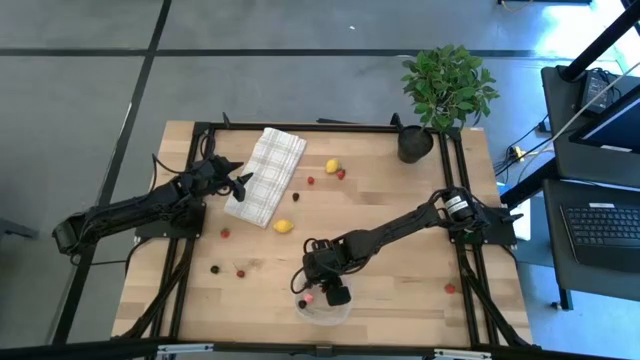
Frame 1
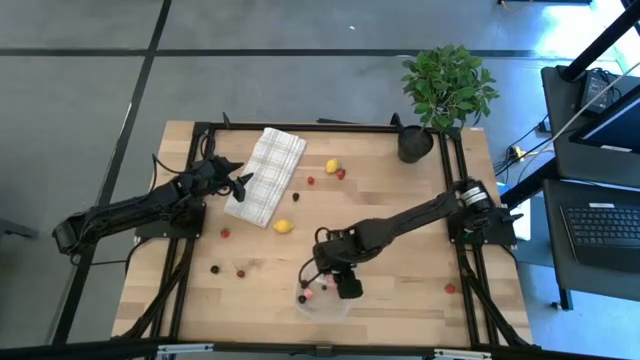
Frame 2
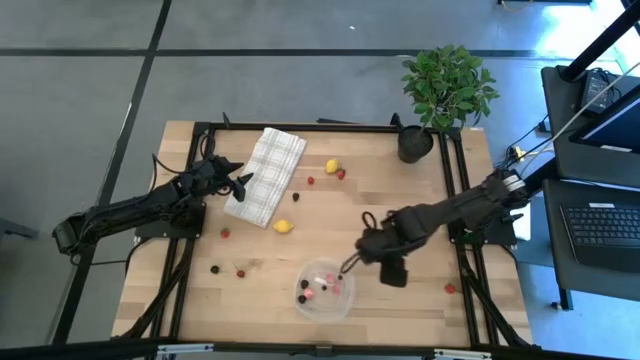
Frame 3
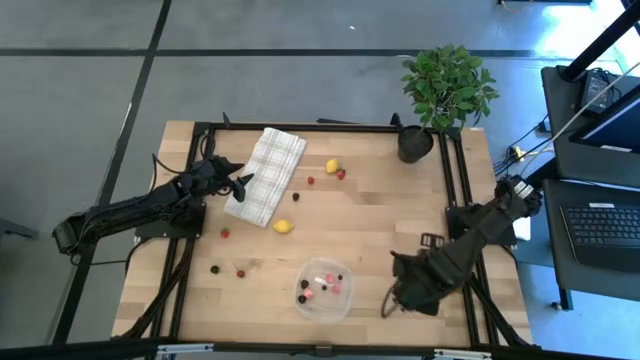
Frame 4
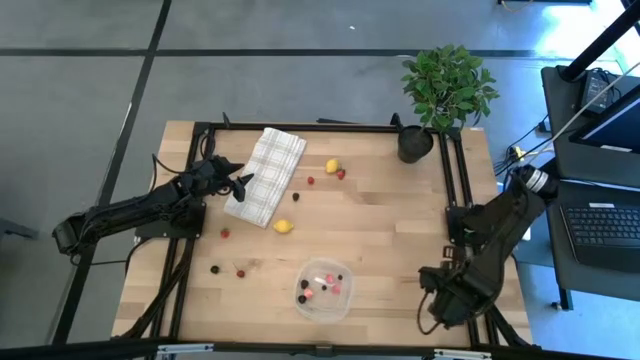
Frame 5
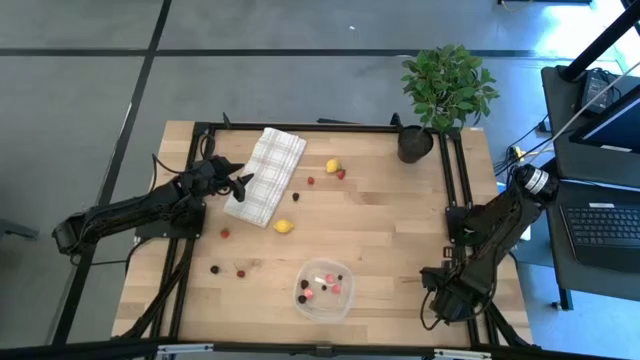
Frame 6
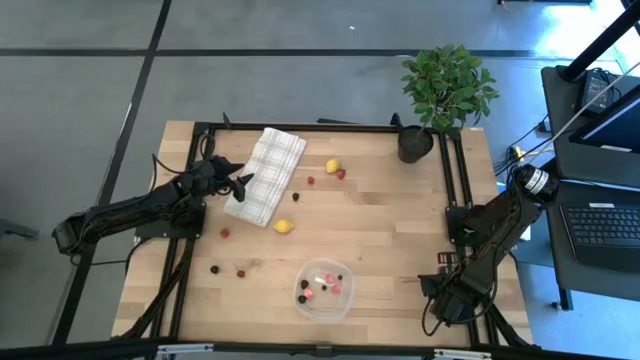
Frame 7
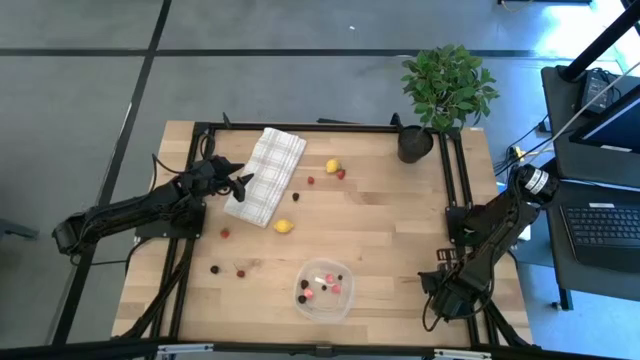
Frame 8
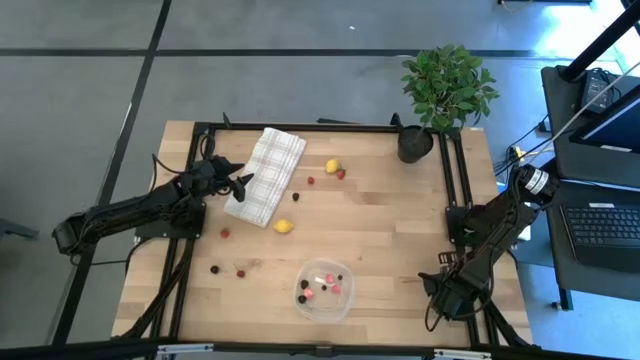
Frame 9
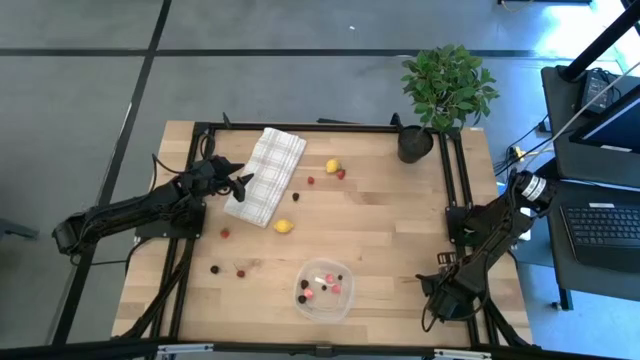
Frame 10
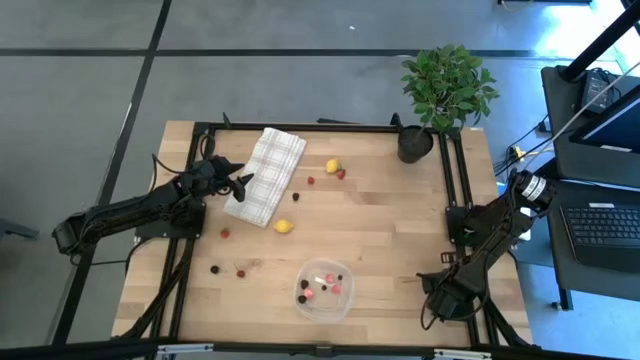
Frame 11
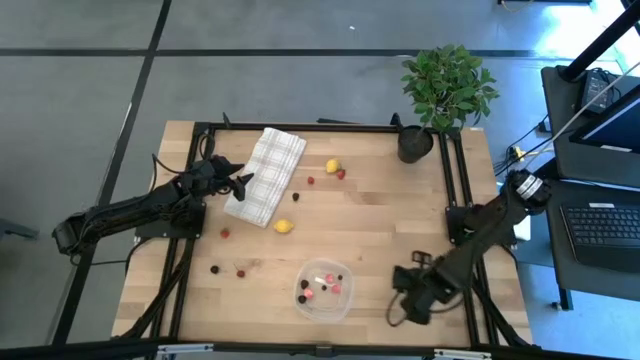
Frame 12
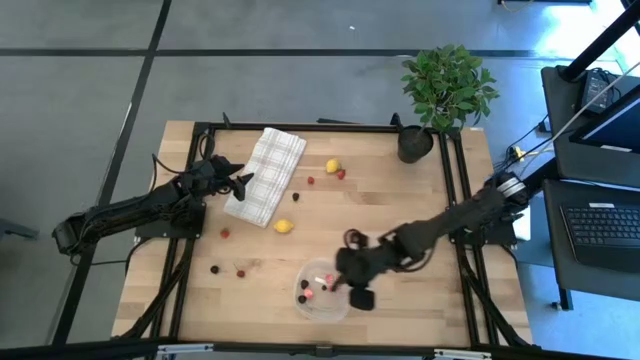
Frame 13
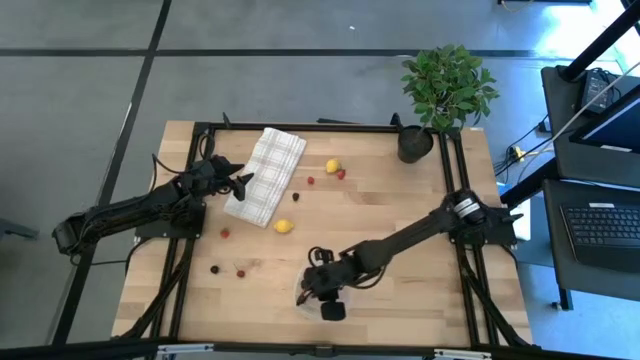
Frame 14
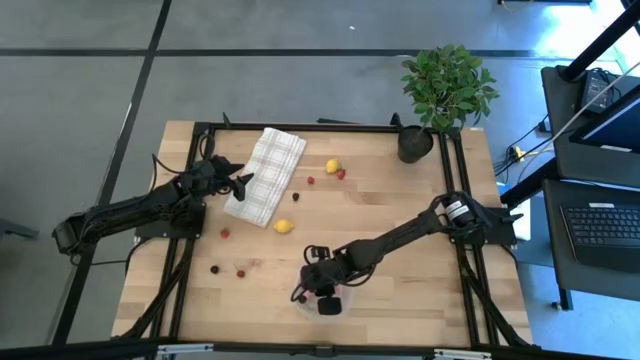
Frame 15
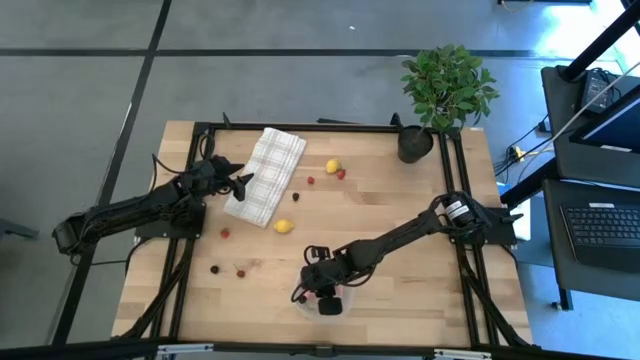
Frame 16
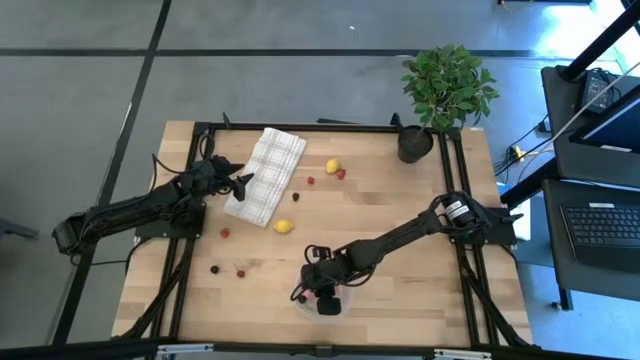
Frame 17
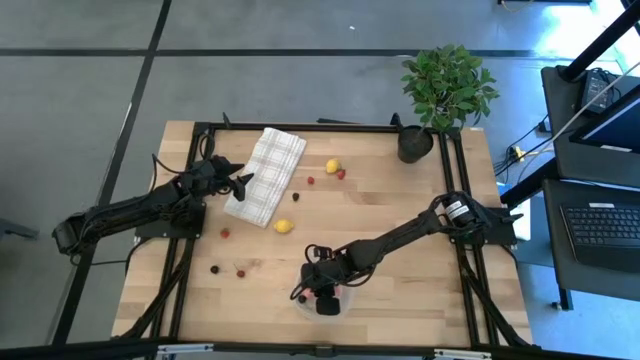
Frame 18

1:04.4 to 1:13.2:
Task: Pick and placing Produce into tupperware
Put the right strawberry into the transparent bin

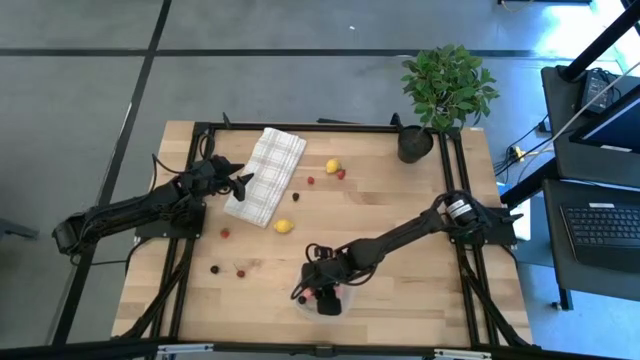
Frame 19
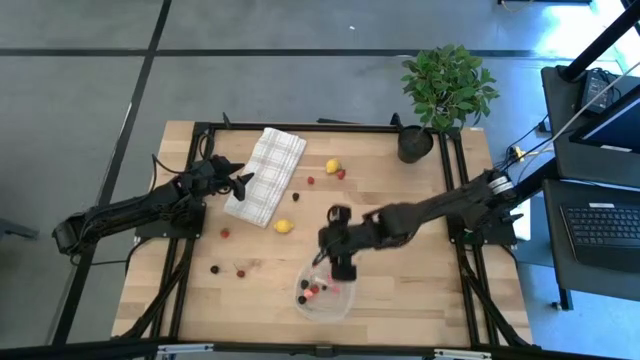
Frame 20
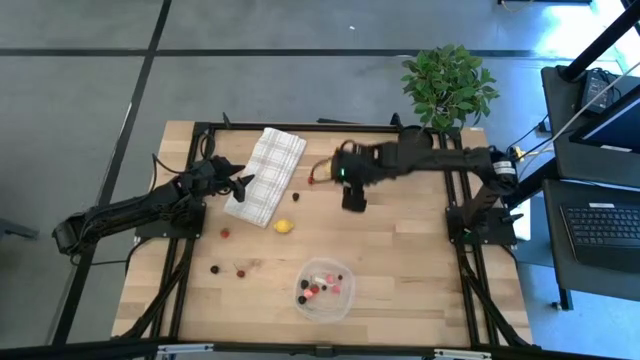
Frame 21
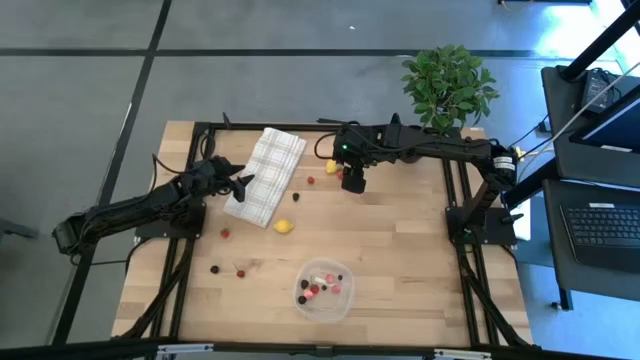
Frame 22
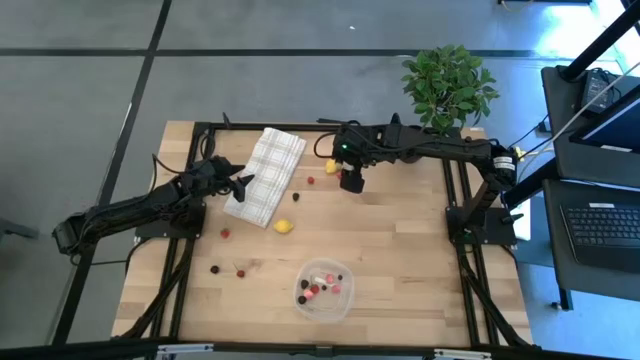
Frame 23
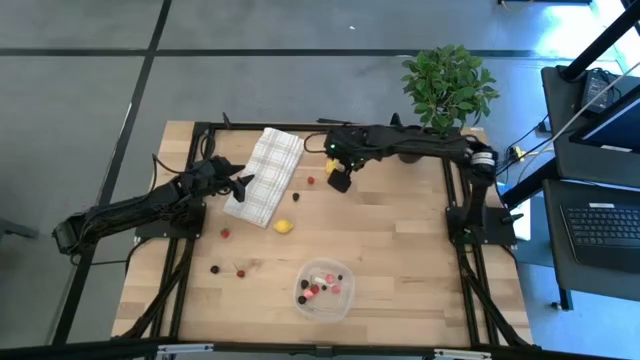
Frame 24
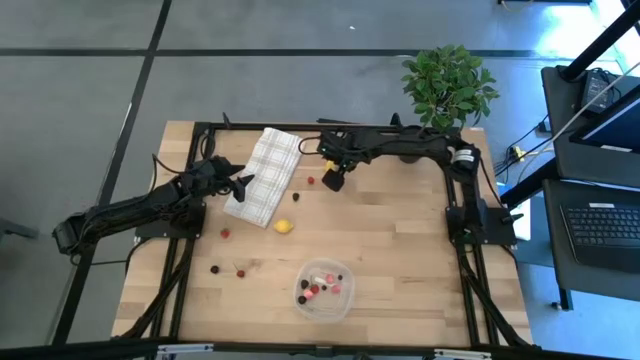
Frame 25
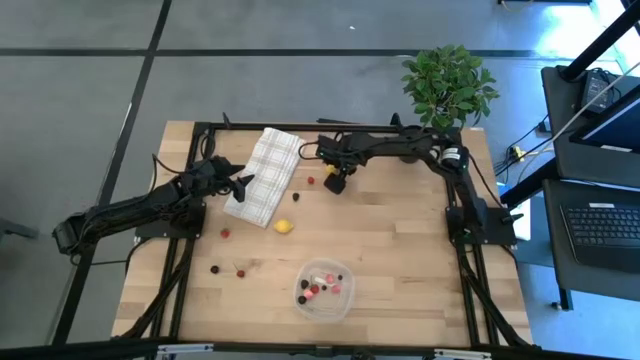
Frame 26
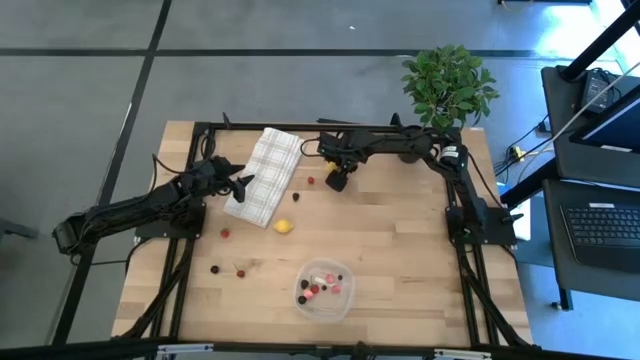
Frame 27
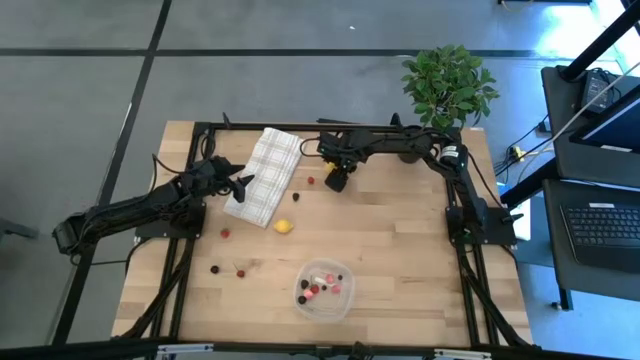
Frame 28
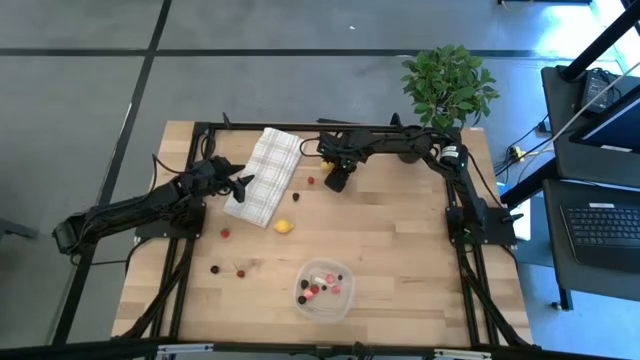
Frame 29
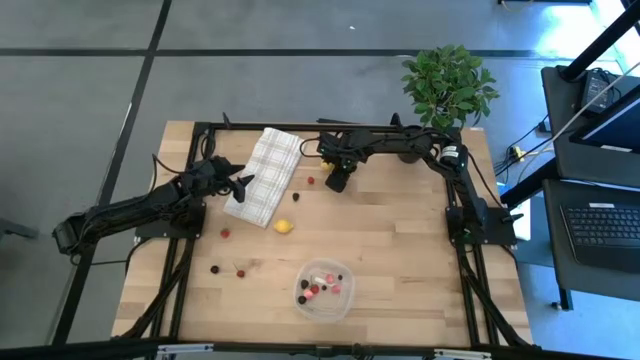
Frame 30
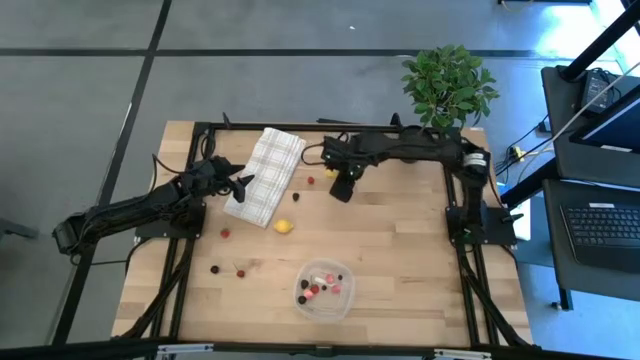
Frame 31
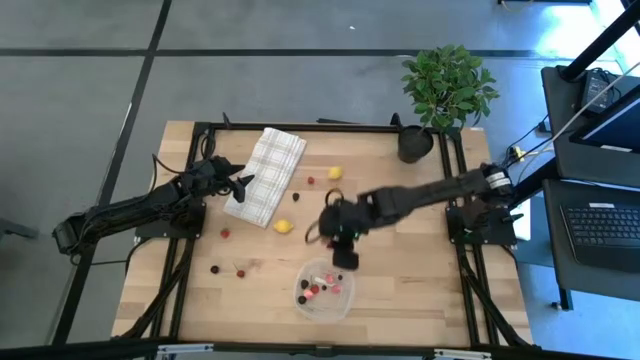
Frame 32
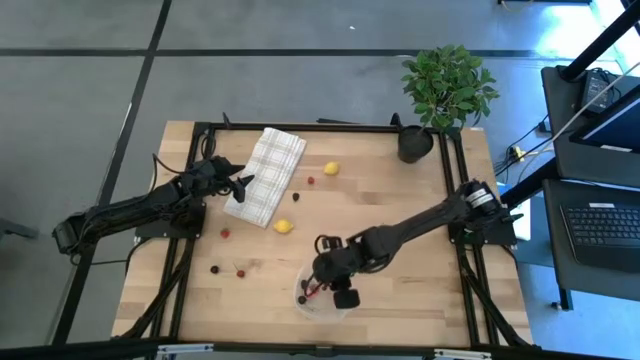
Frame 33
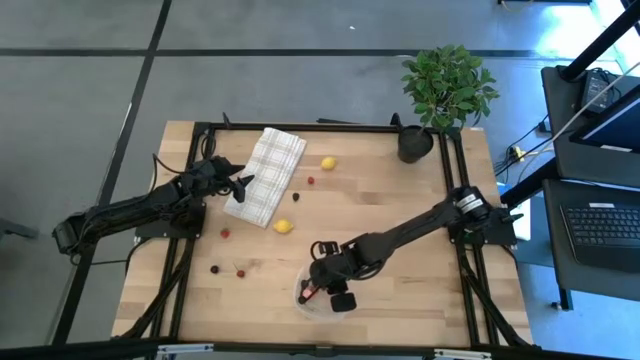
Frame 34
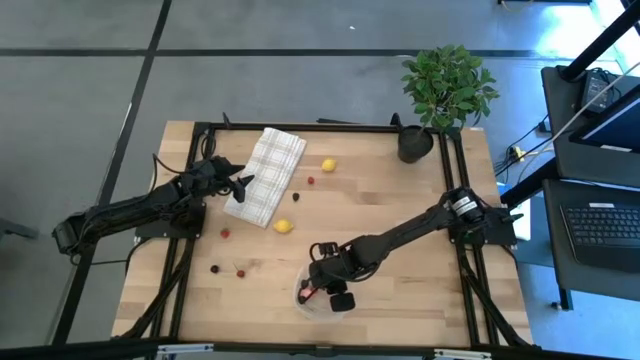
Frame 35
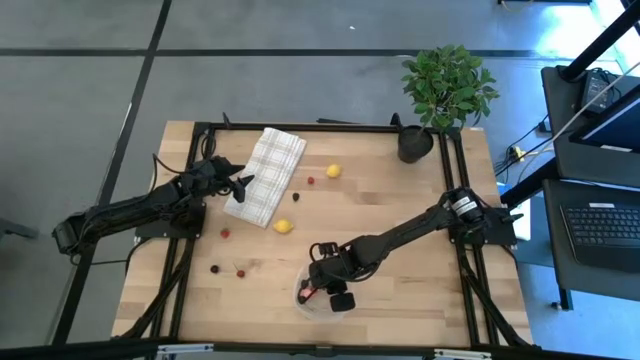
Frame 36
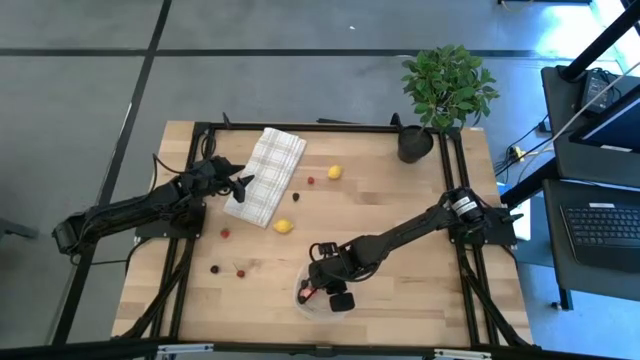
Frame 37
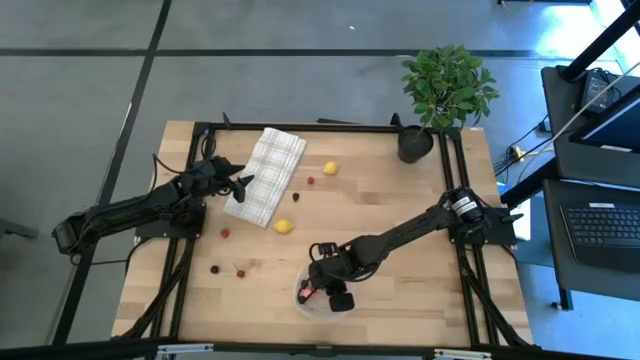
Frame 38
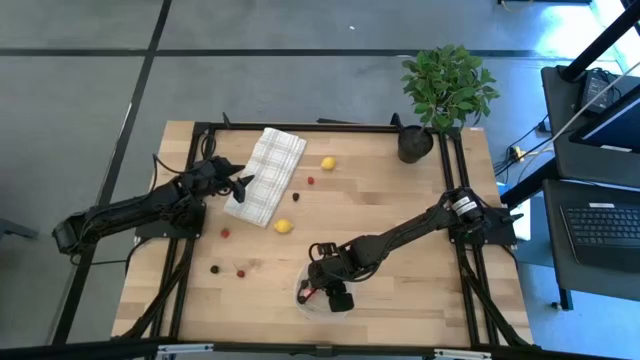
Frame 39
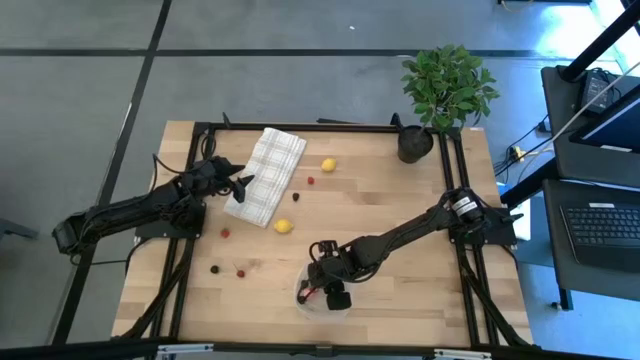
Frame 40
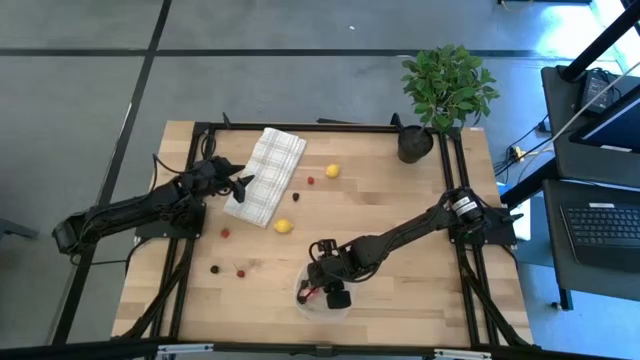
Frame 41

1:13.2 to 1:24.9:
Put the top strawberry into the transparent bin
